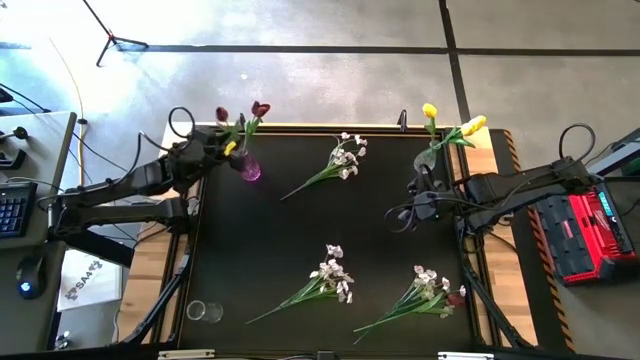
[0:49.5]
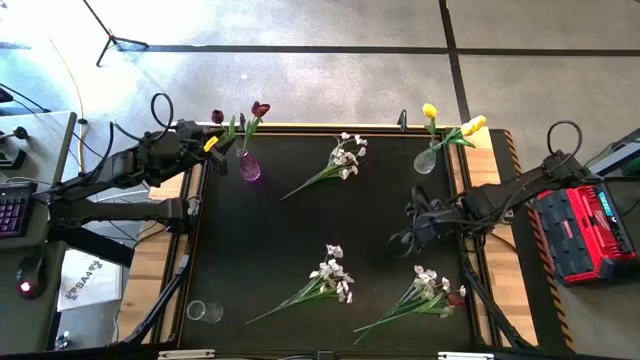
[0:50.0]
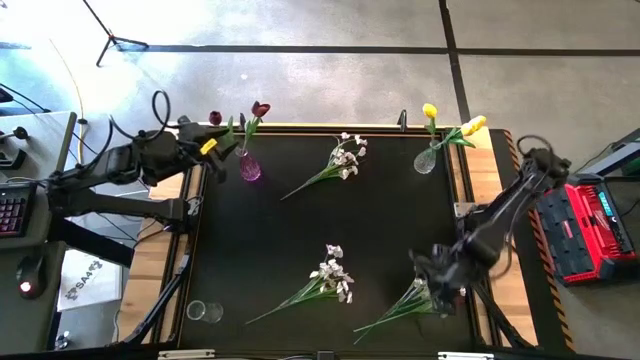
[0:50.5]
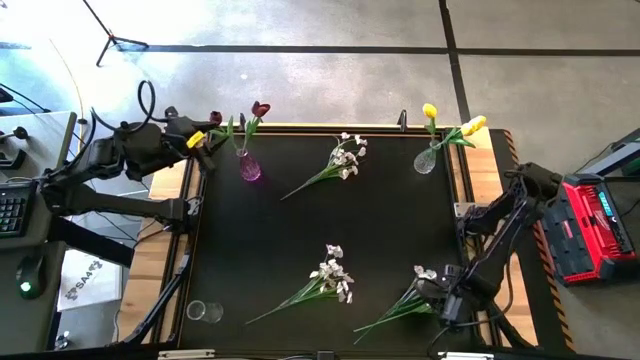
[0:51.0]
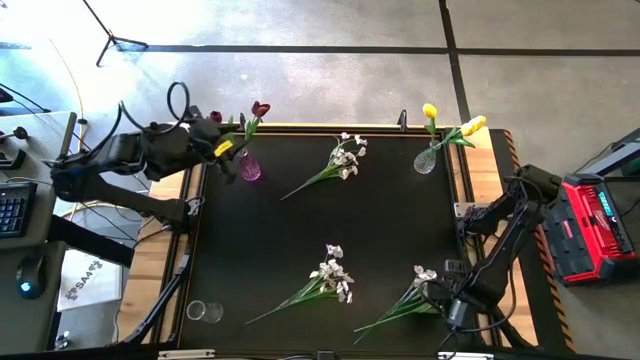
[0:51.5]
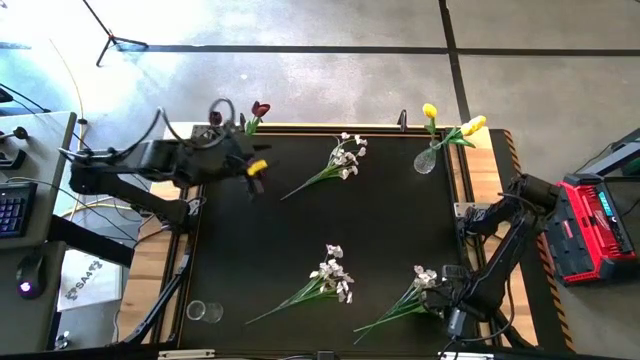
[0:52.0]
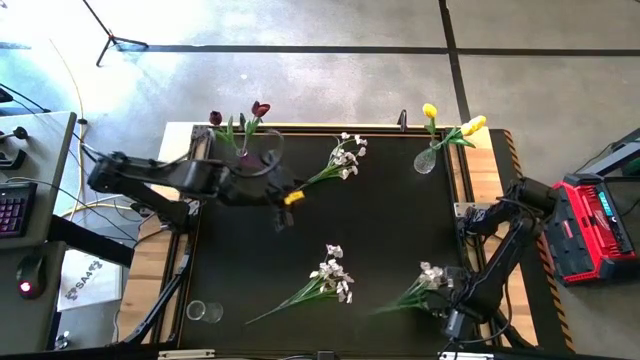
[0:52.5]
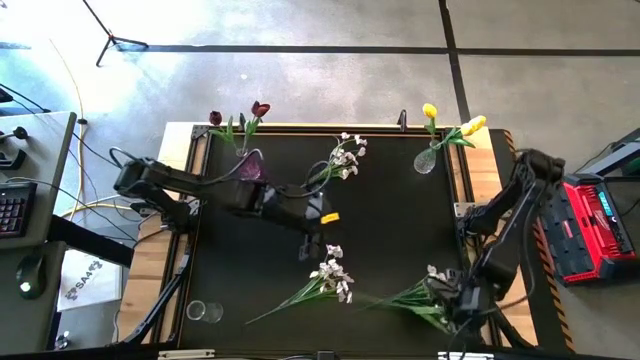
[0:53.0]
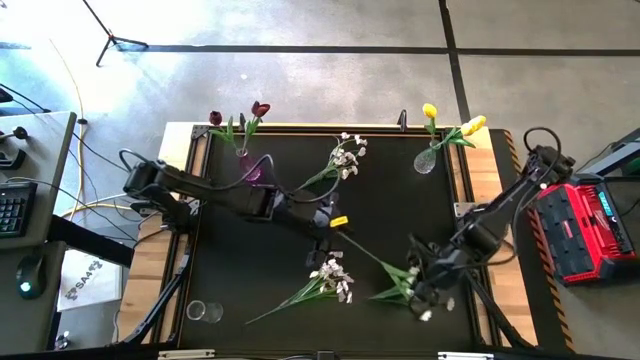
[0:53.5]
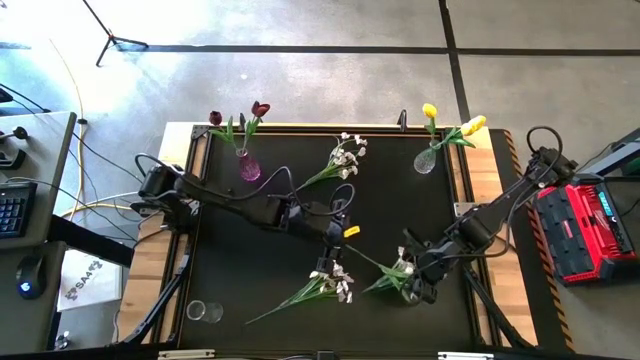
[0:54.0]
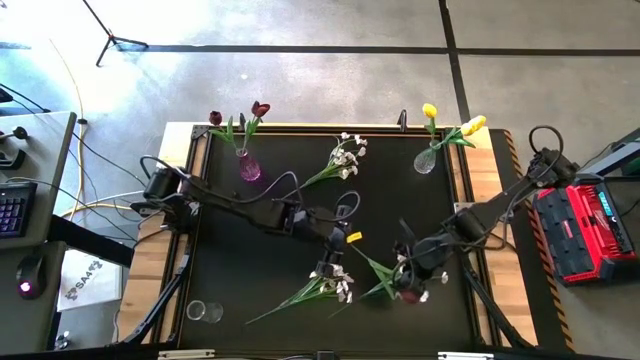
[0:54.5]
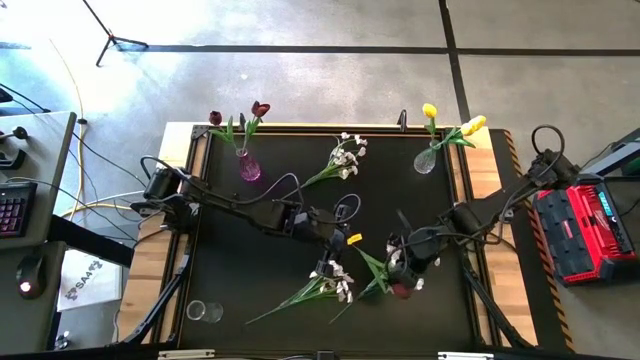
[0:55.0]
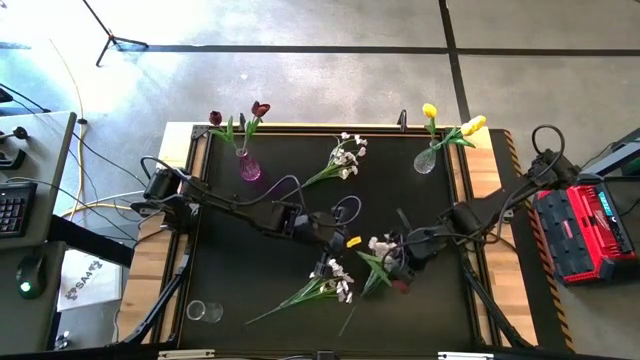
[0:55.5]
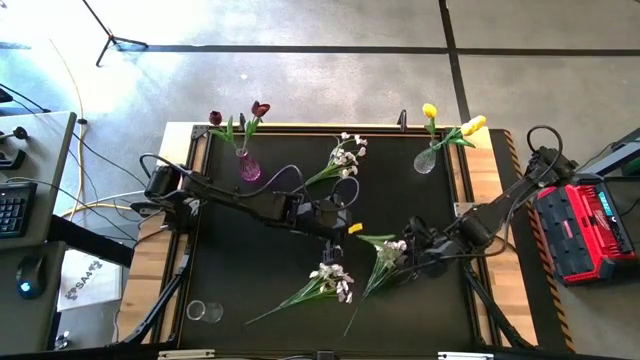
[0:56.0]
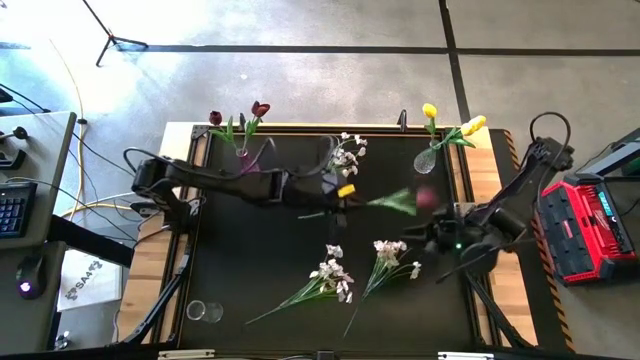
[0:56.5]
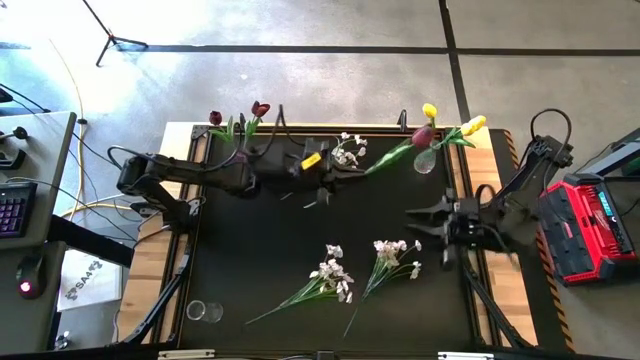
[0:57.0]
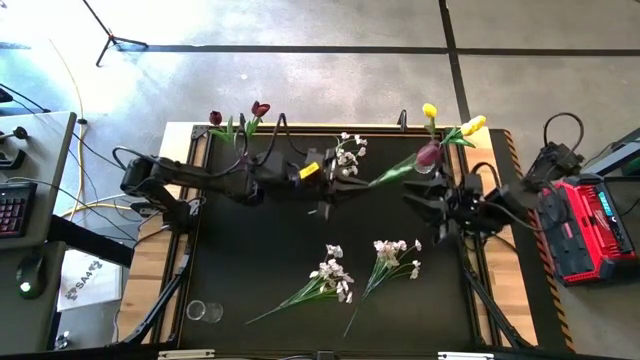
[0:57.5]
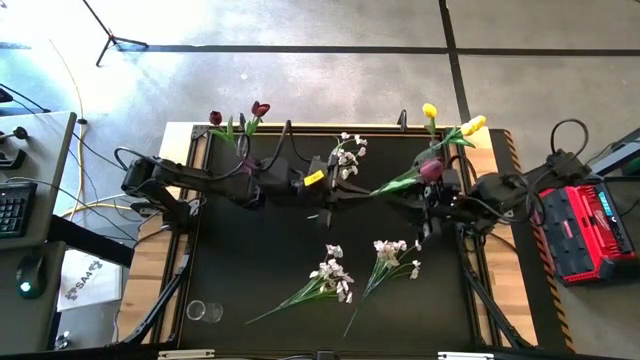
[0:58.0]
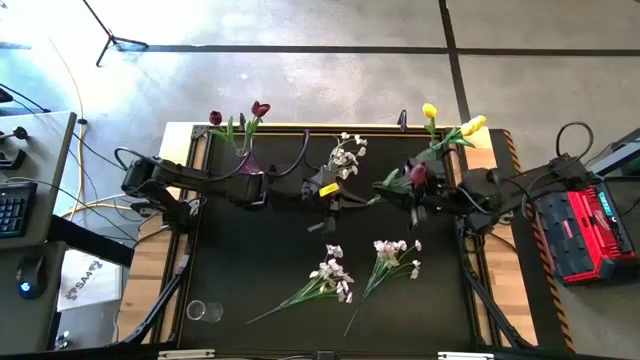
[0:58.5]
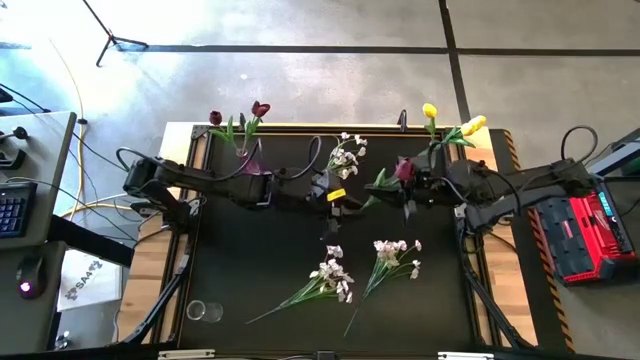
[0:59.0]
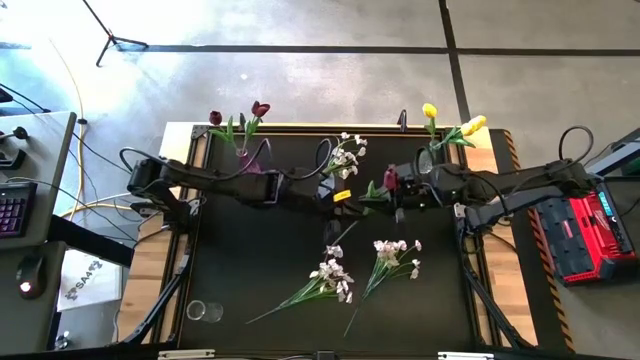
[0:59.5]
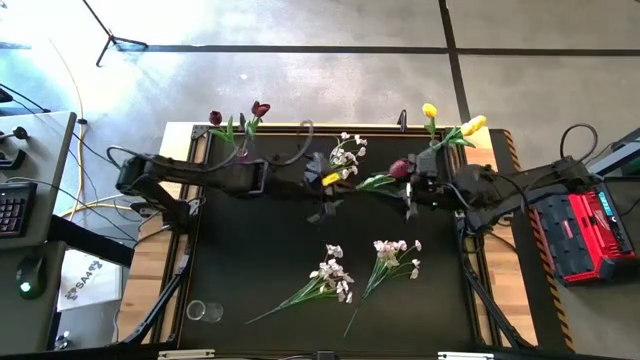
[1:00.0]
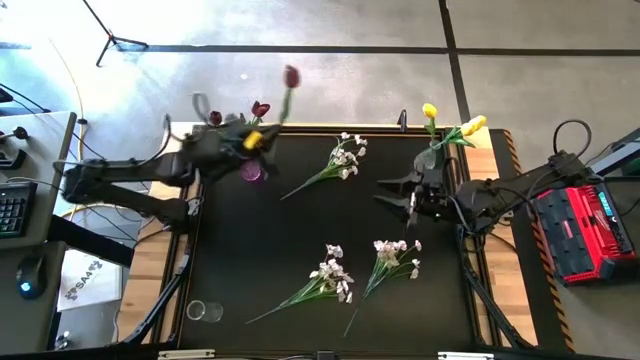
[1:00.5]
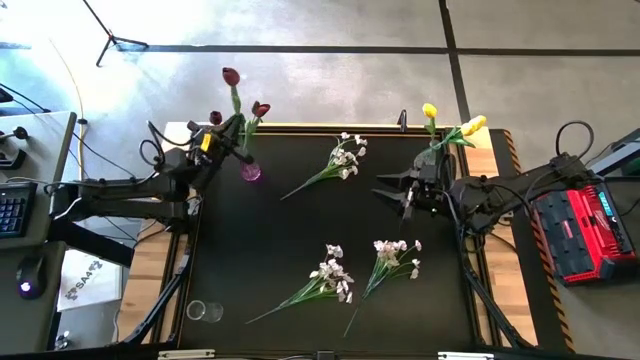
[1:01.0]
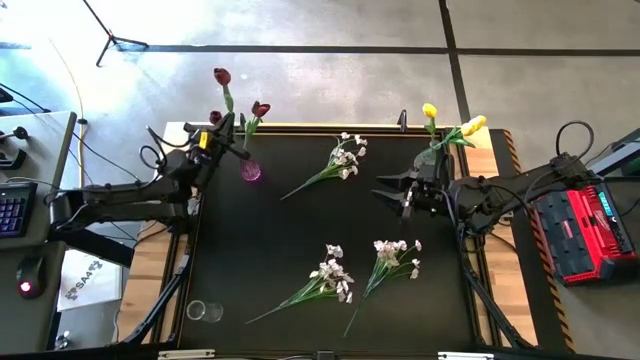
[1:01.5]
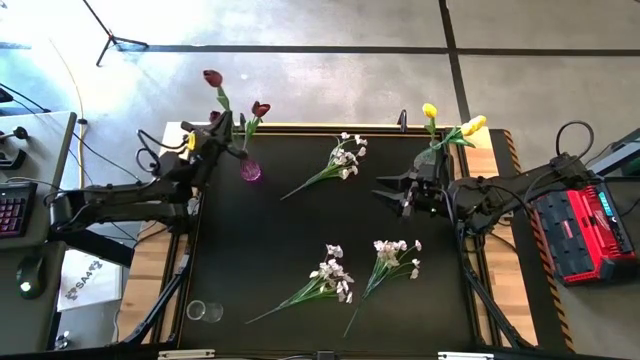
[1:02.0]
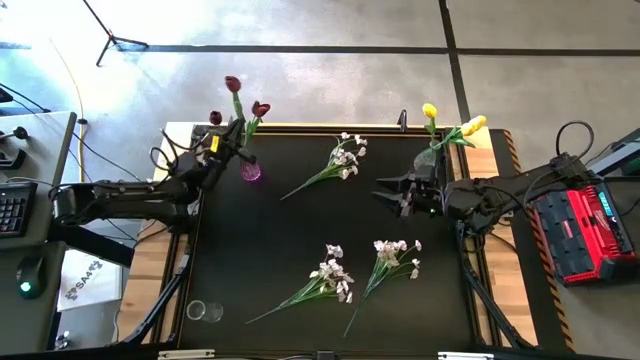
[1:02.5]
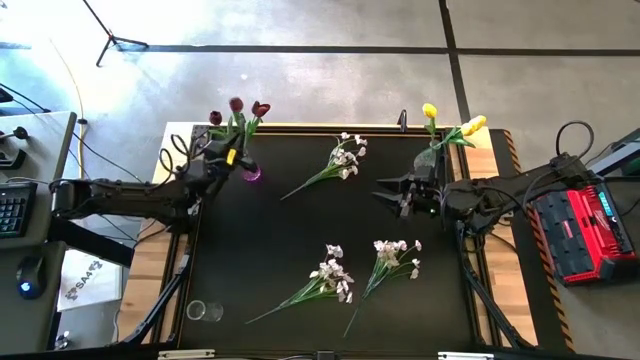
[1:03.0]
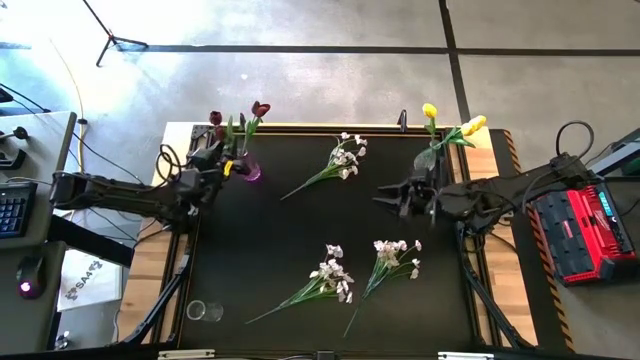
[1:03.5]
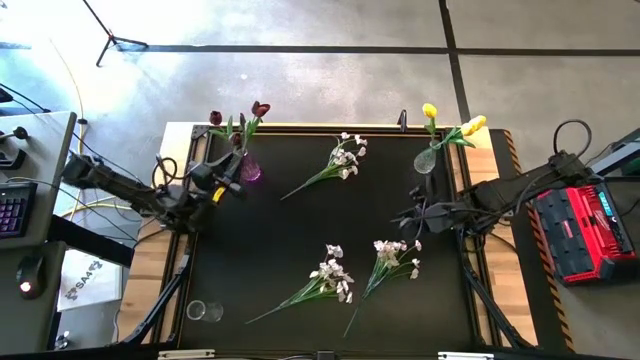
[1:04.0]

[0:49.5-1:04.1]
Task: Sort flowers into vase by color
Put the red tulip into the purple flower vase

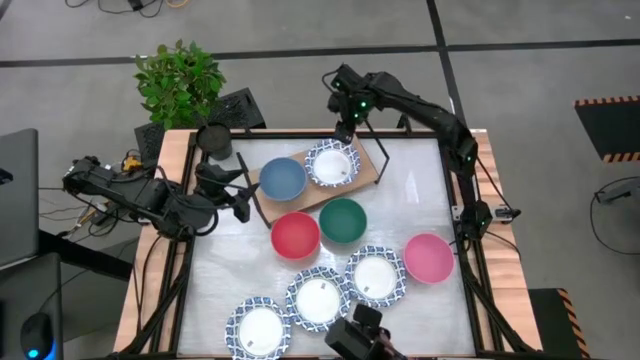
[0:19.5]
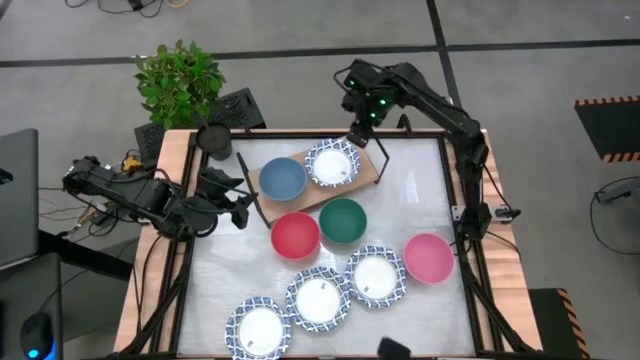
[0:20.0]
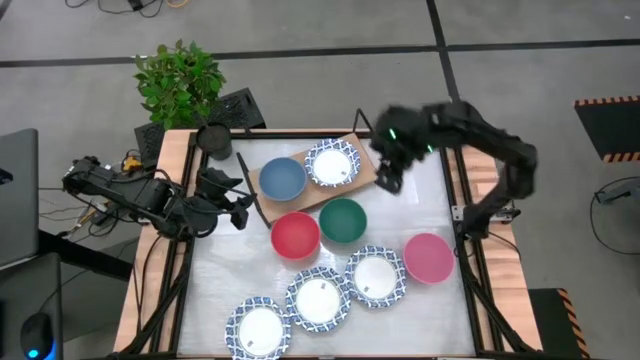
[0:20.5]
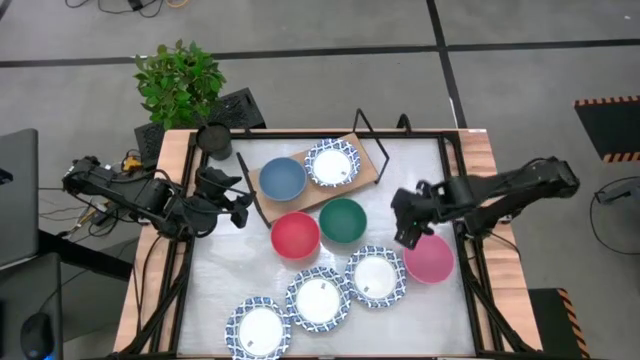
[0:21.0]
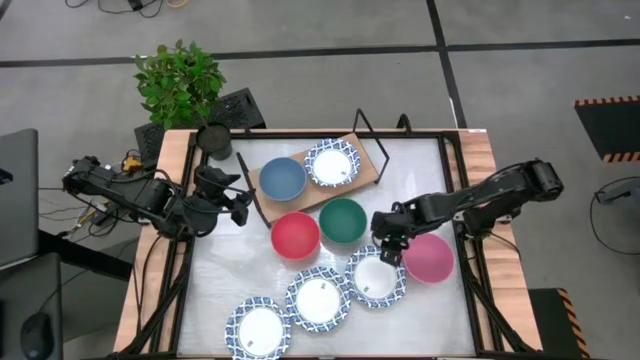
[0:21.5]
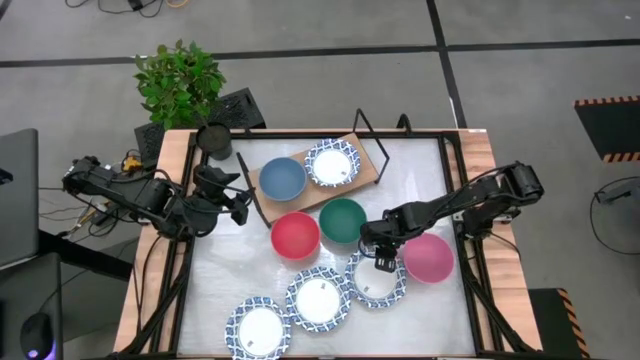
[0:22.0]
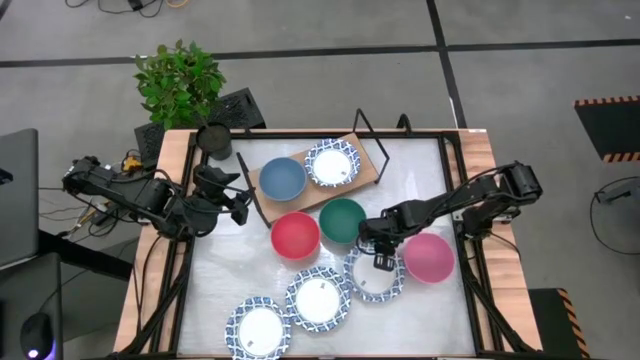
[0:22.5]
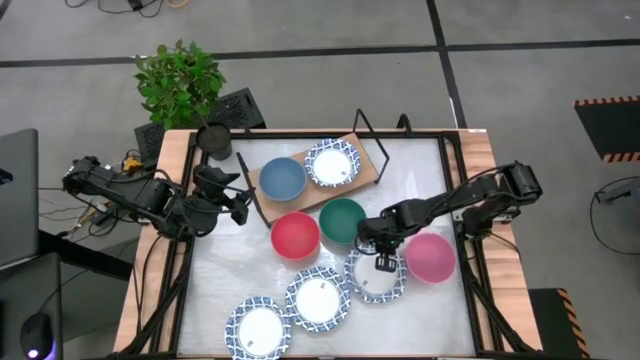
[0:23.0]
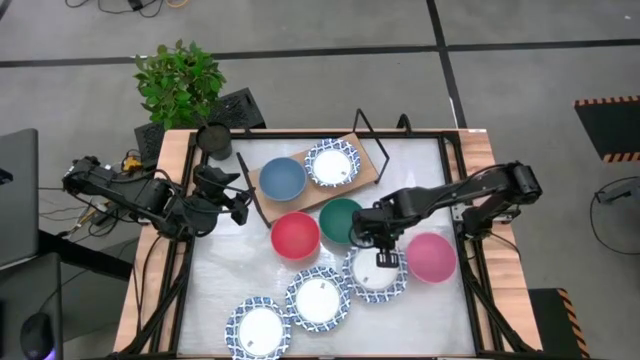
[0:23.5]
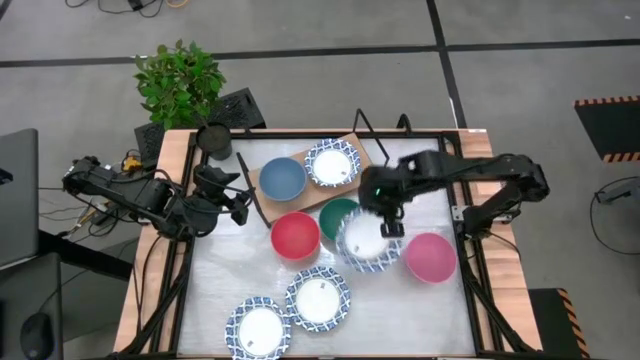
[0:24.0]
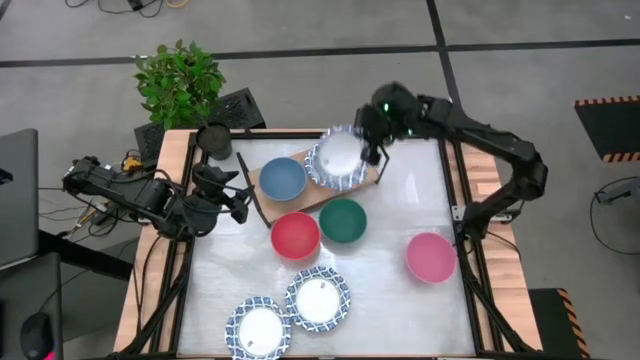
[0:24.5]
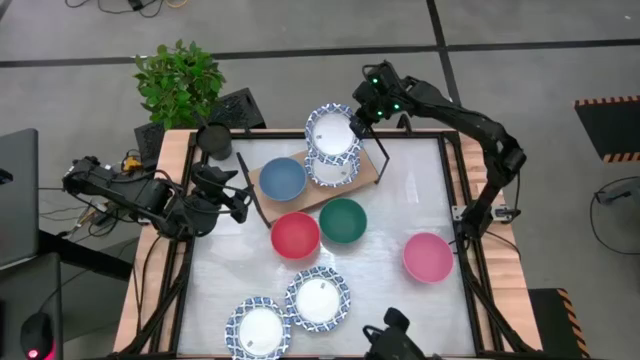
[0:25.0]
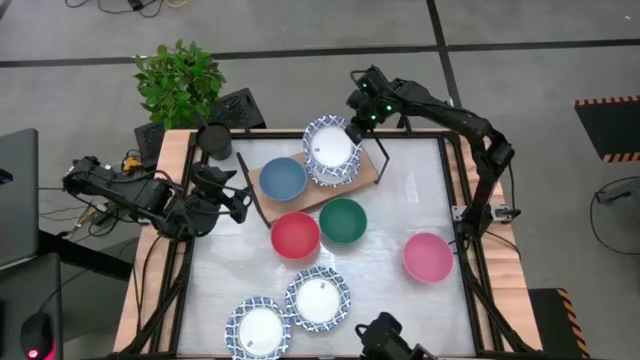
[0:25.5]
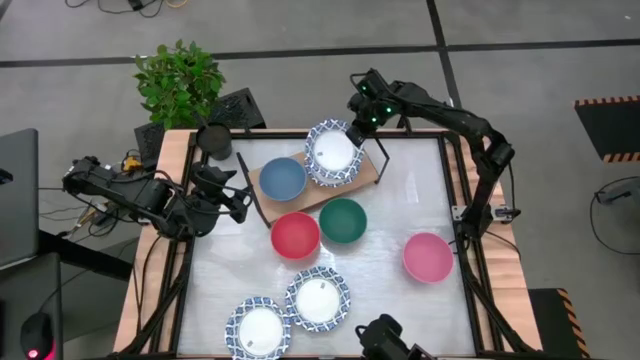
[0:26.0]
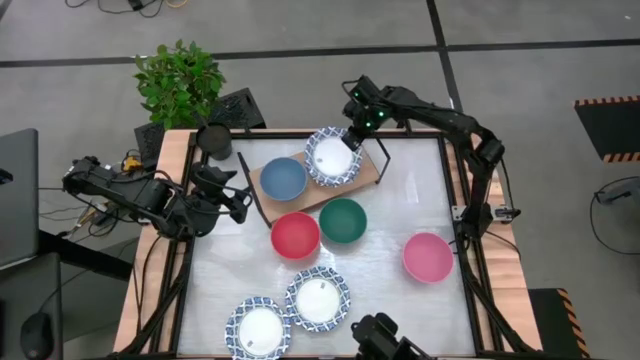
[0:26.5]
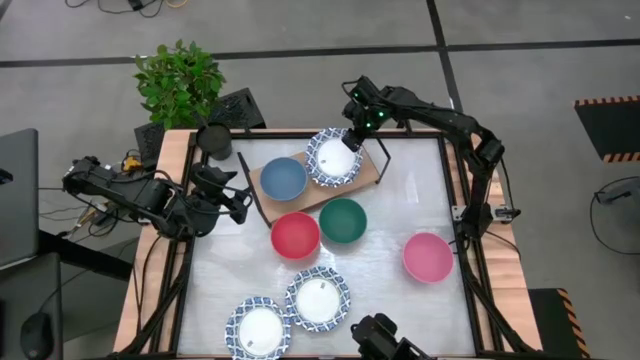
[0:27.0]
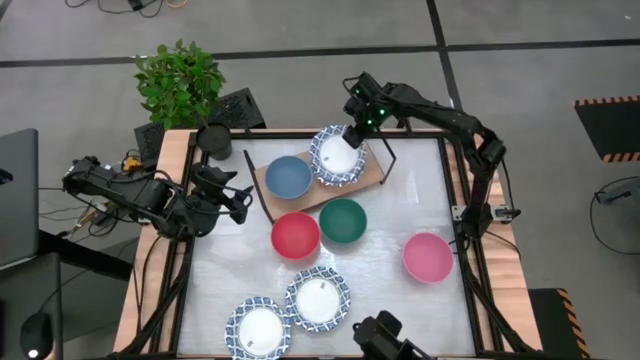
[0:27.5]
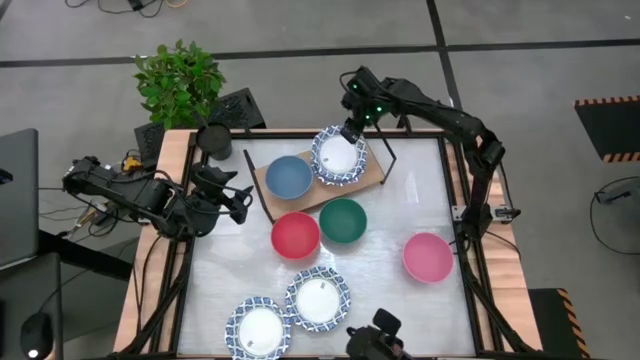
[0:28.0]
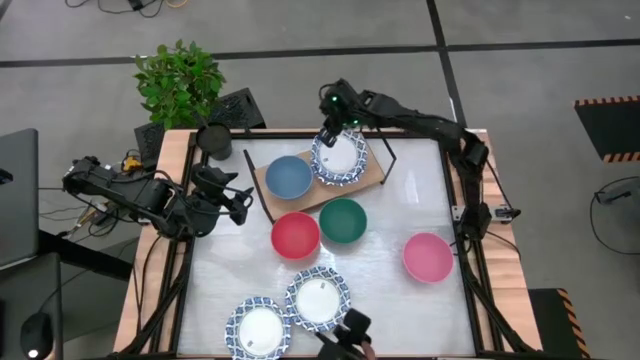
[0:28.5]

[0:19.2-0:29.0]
Task: Place and stack bowls onto a shelf
Stack the white patterned bowl on top of the white patterned bowl on the shelf
